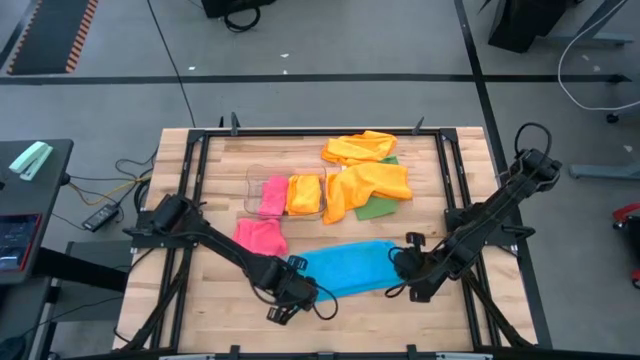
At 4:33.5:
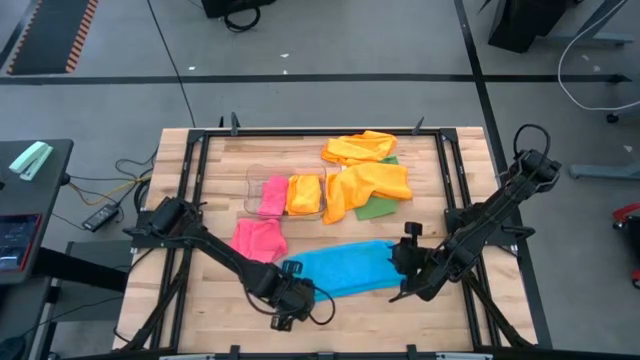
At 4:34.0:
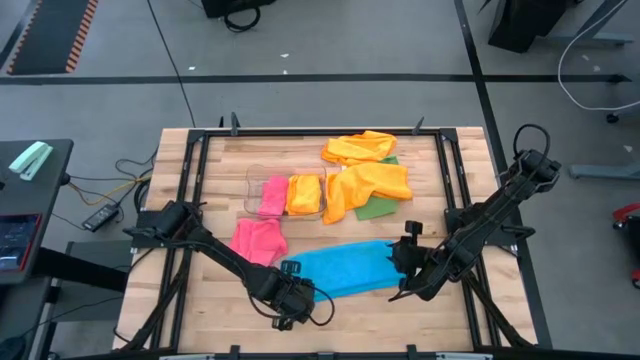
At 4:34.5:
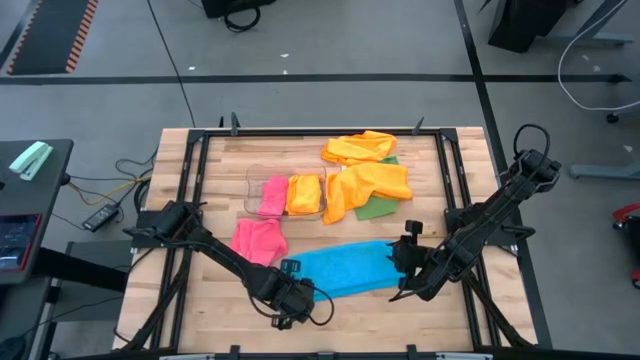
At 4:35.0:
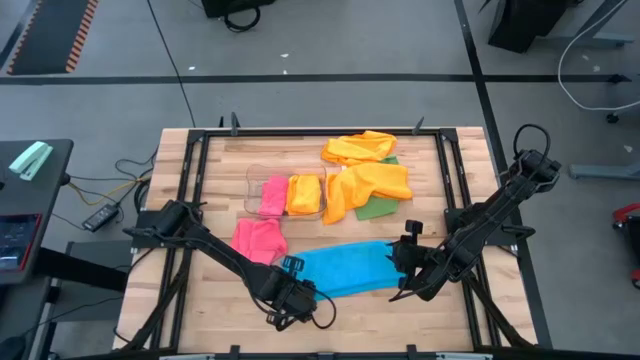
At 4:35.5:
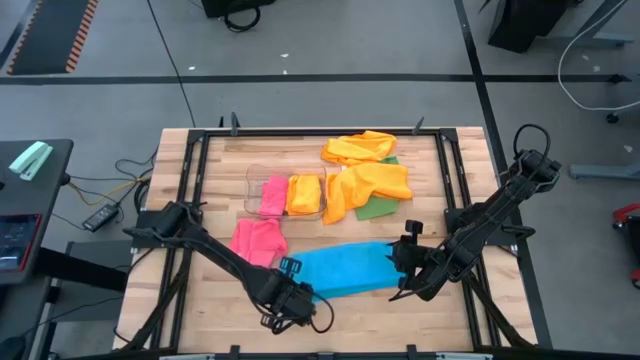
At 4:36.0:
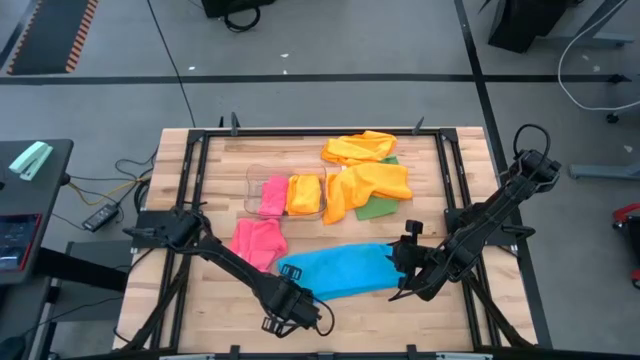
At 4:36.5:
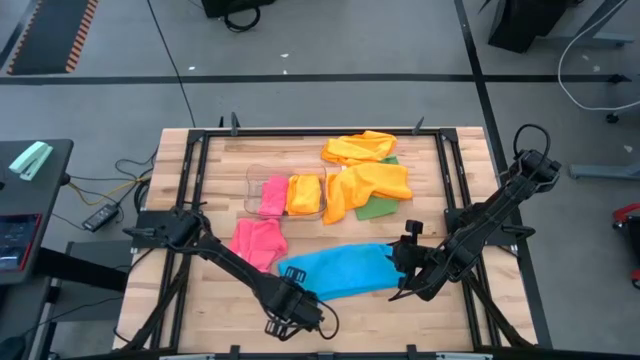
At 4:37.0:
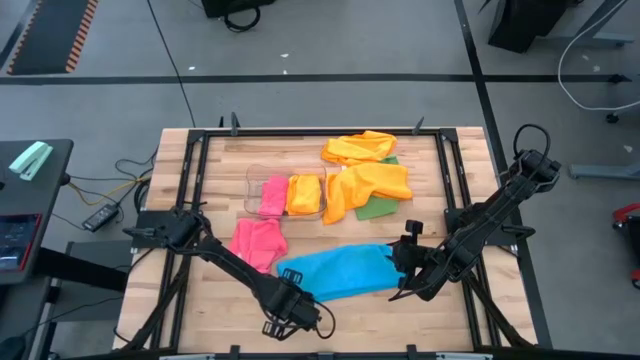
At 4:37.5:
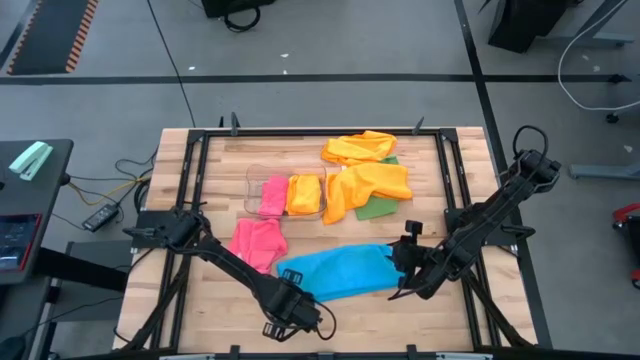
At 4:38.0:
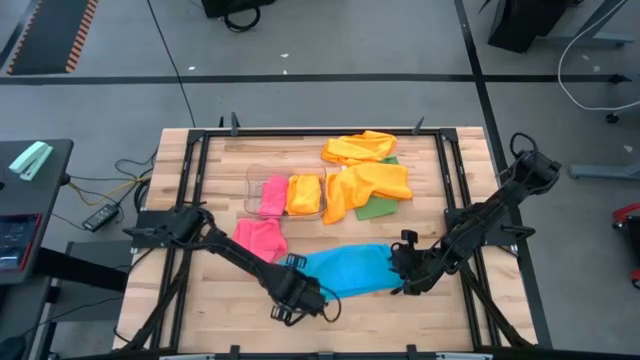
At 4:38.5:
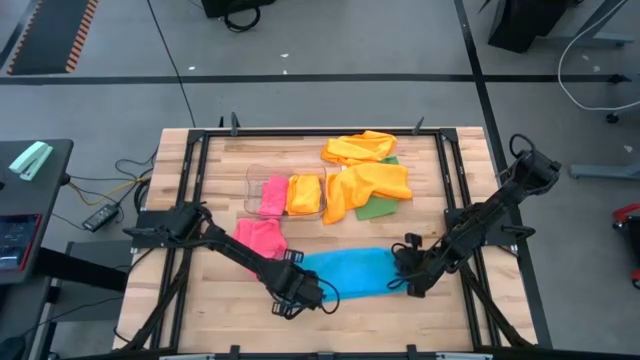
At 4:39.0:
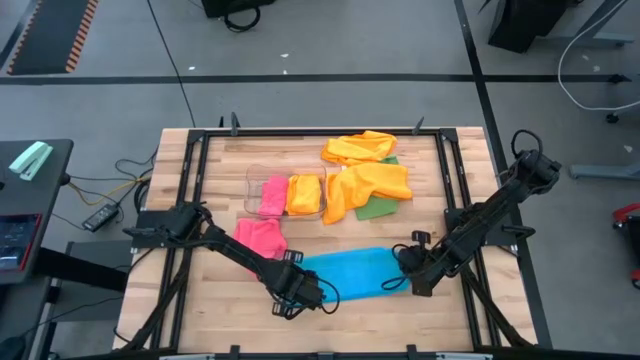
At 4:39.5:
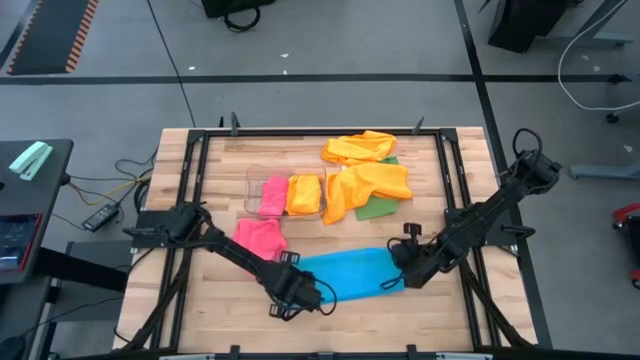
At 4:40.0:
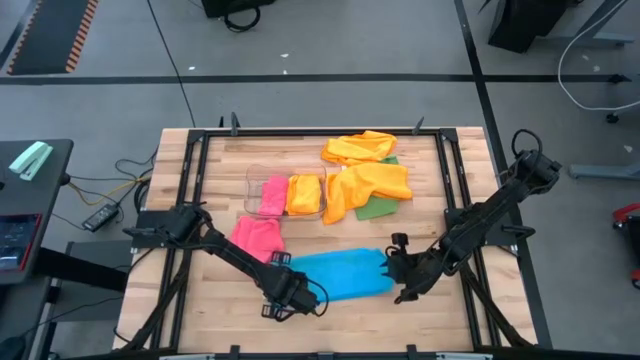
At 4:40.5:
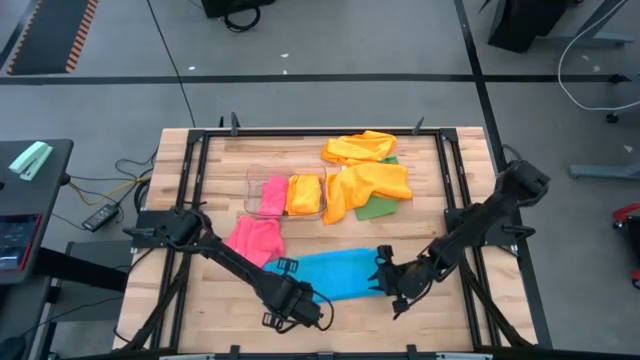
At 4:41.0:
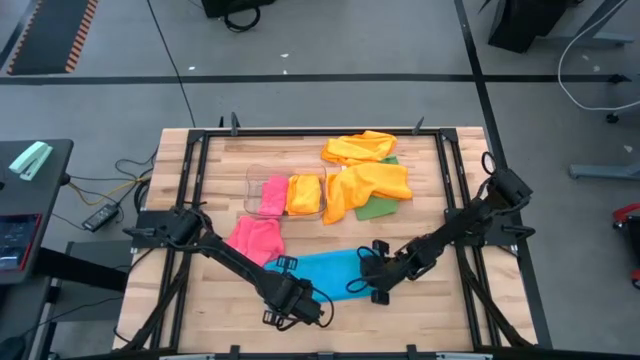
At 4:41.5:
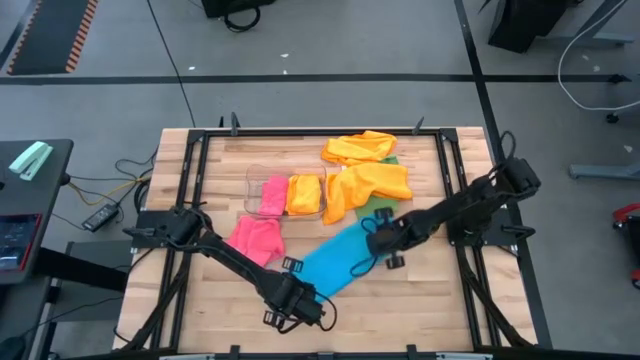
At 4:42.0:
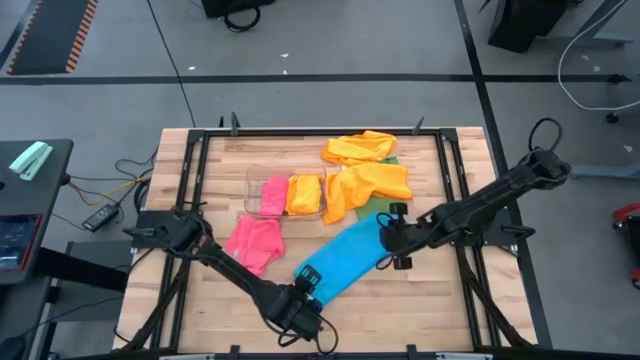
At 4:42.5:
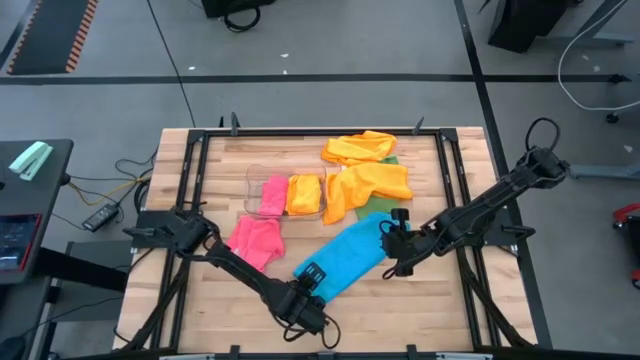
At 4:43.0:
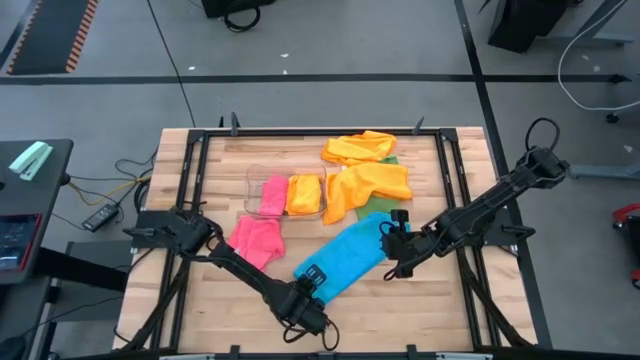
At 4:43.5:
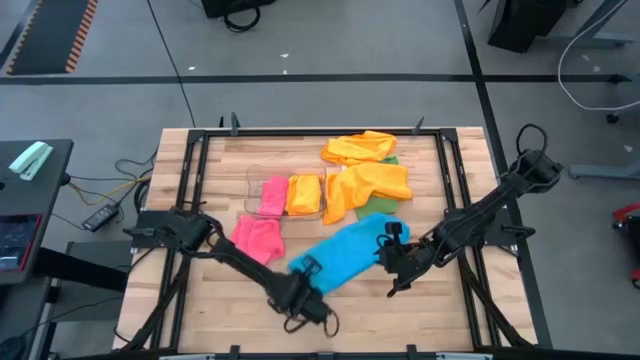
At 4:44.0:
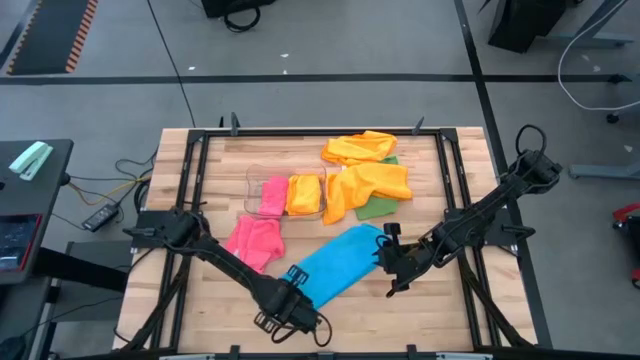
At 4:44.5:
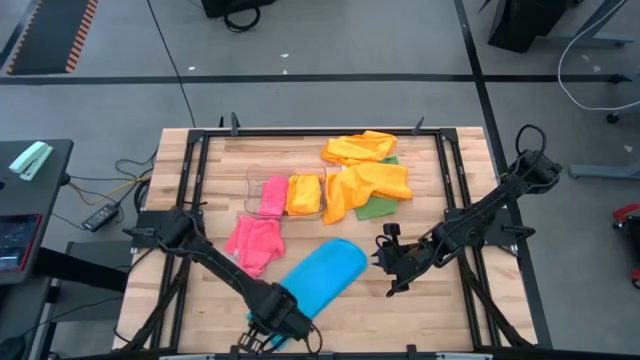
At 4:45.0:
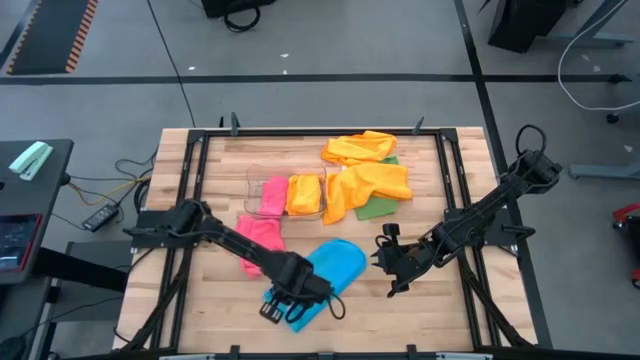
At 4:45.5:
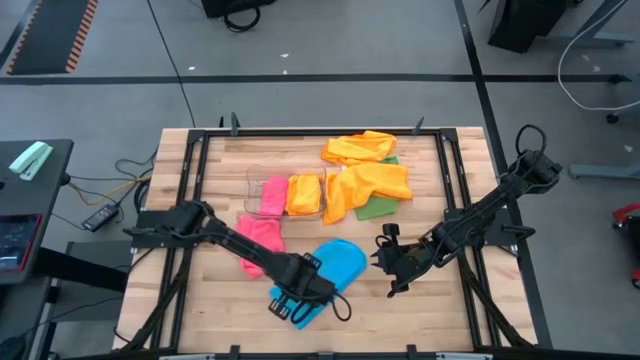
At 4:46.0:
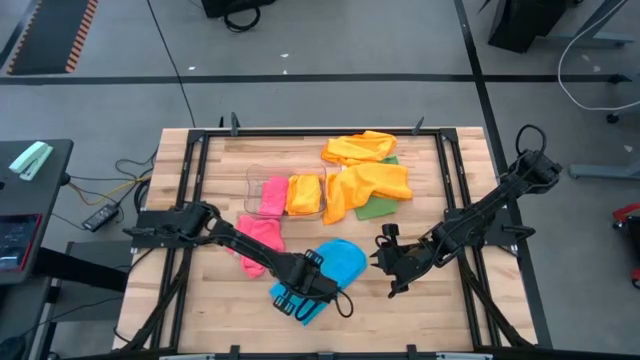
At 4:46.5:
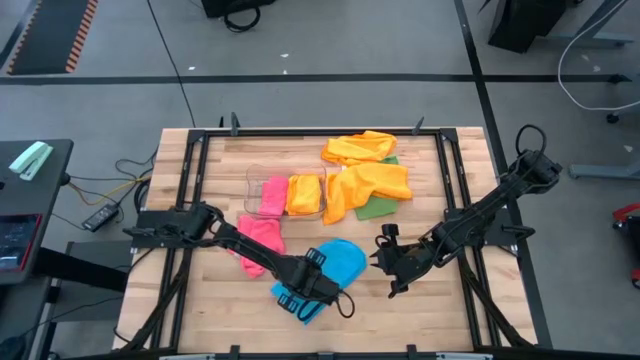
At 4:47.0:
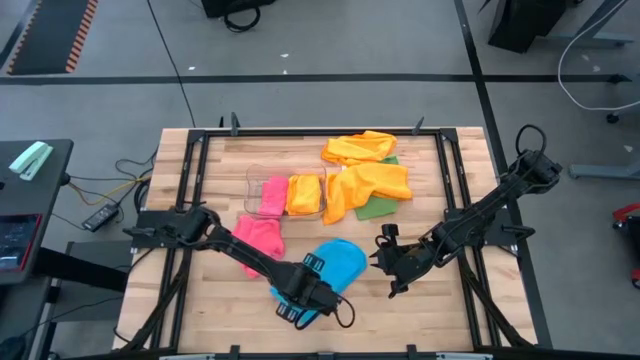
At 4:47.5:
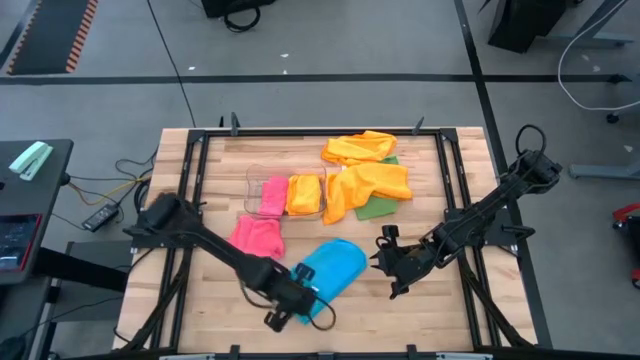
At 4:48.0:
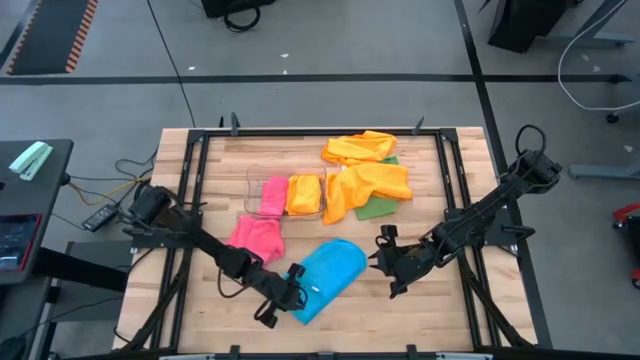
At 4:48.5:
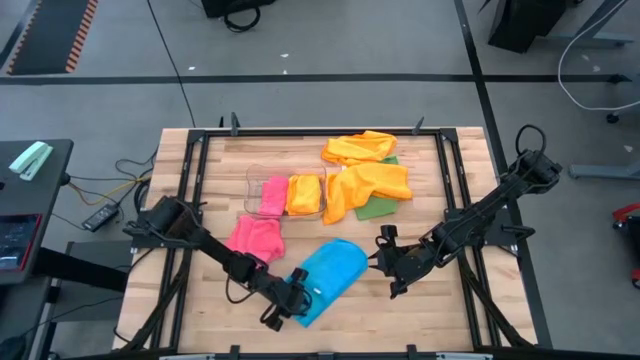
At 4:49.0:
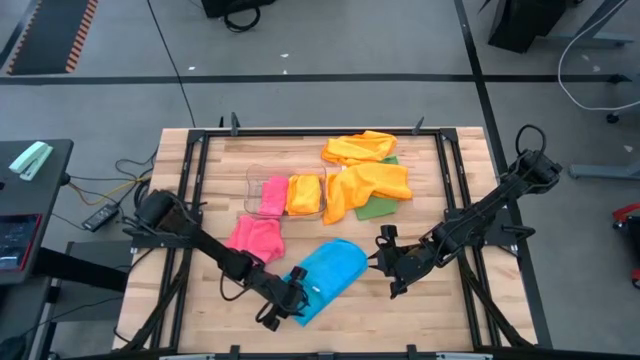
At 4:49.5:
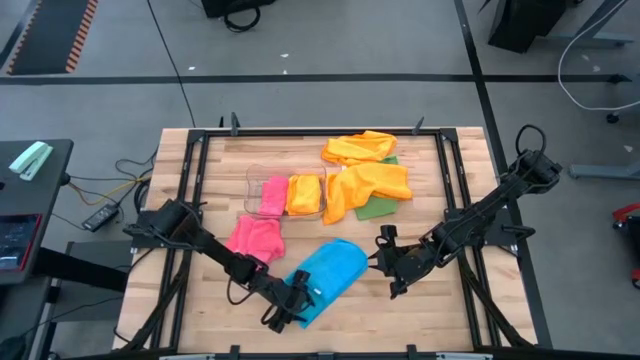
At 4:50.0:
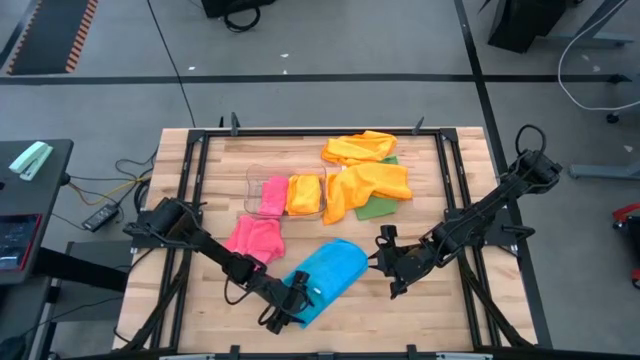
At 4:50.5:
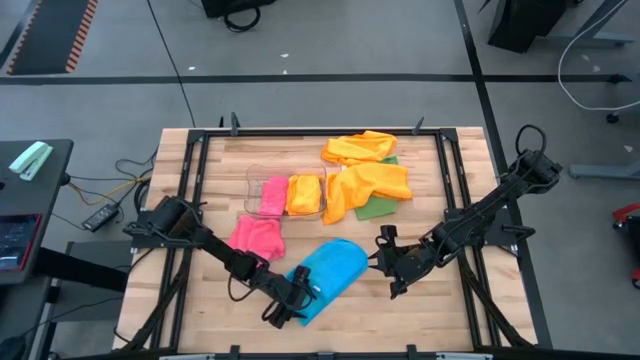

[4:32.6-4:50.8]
Task: Fold microfiber towels
Fold the blue microfiber cloth
